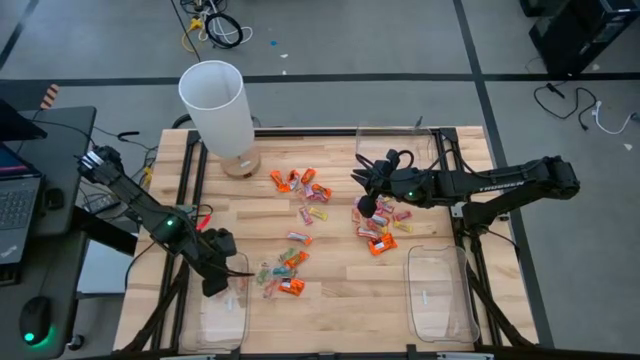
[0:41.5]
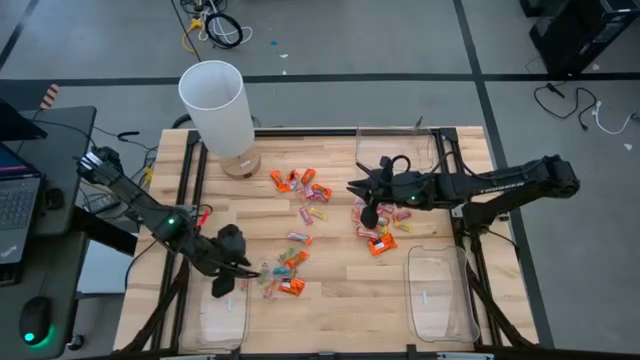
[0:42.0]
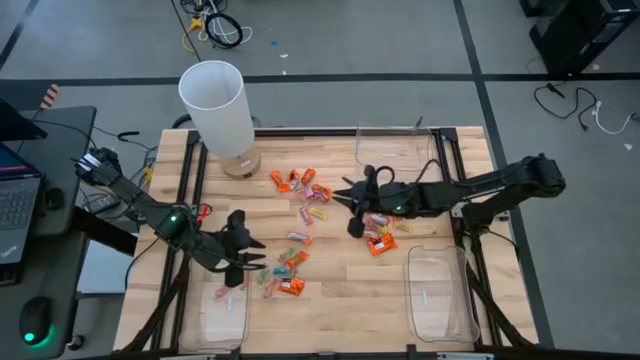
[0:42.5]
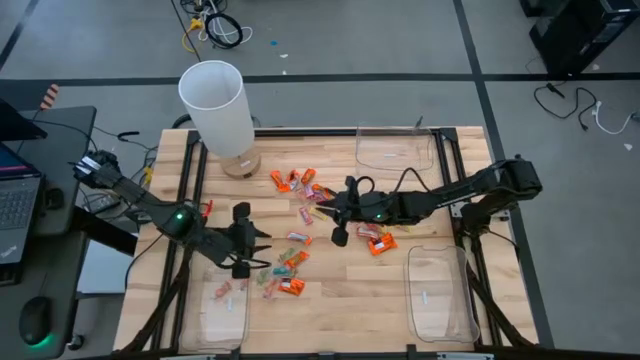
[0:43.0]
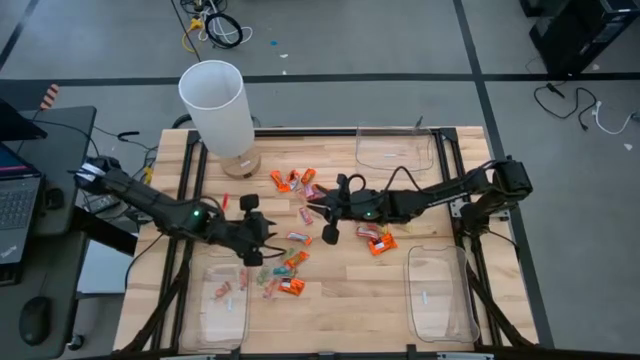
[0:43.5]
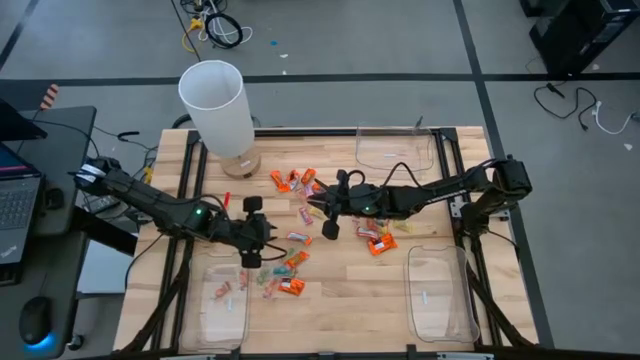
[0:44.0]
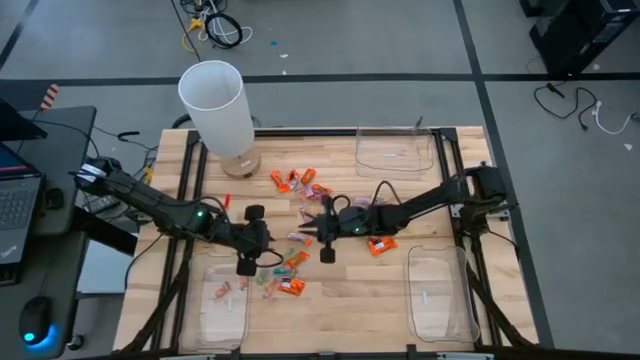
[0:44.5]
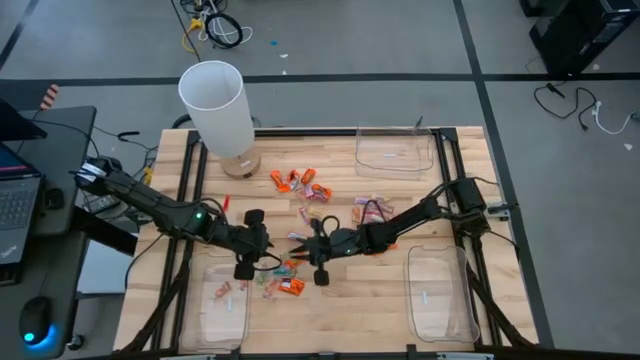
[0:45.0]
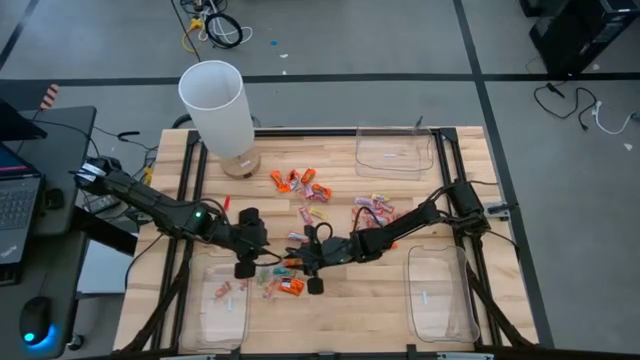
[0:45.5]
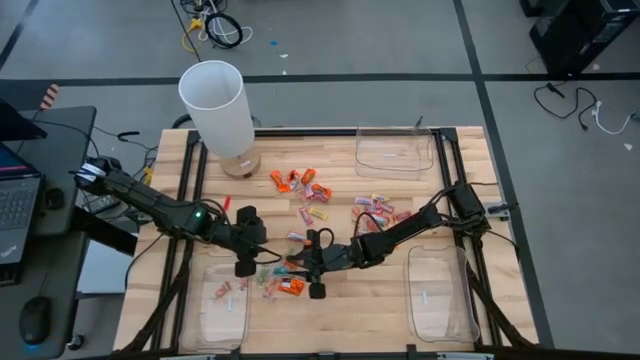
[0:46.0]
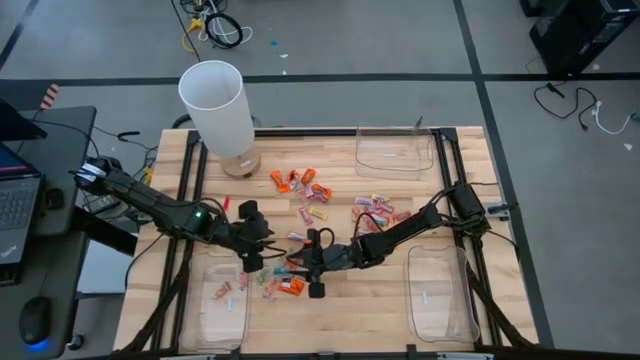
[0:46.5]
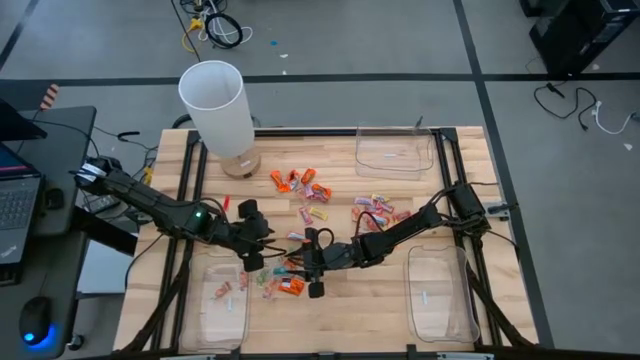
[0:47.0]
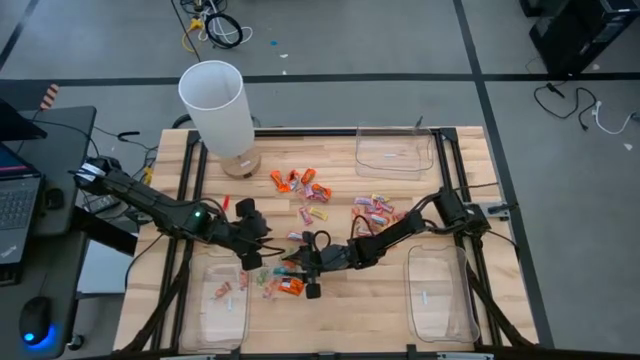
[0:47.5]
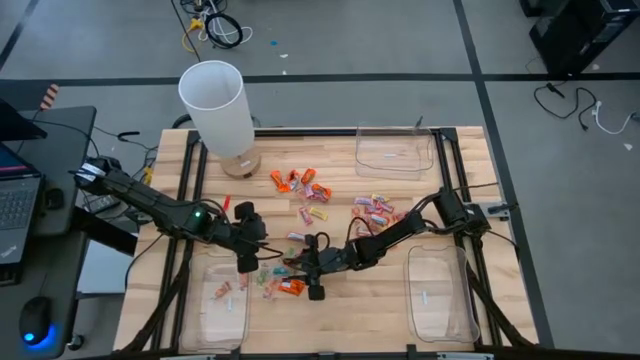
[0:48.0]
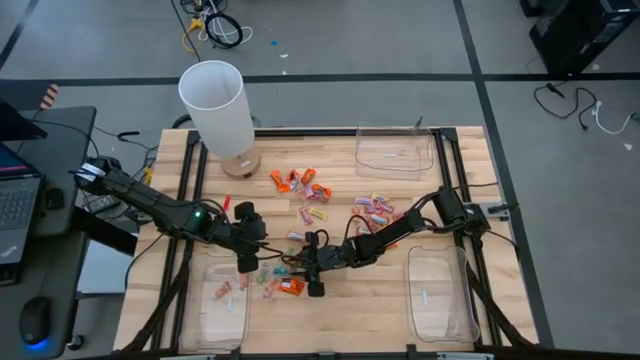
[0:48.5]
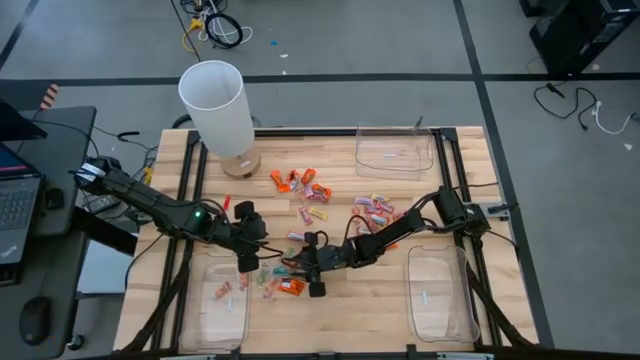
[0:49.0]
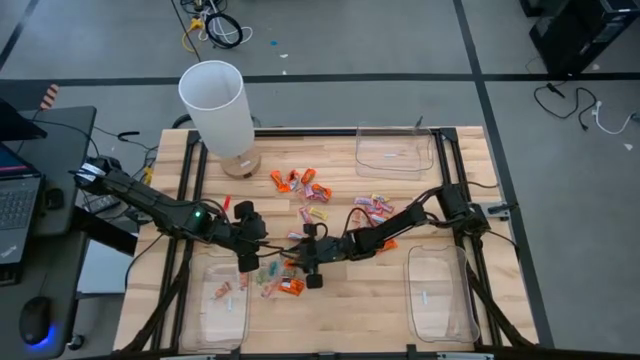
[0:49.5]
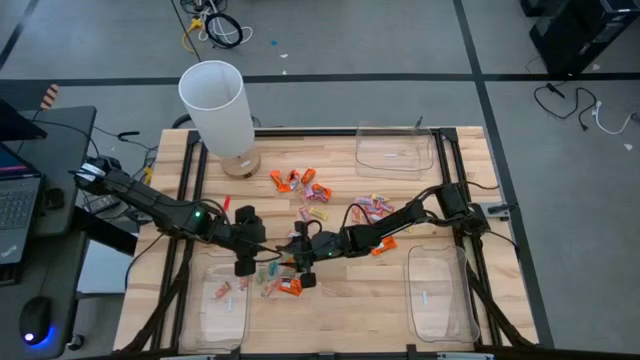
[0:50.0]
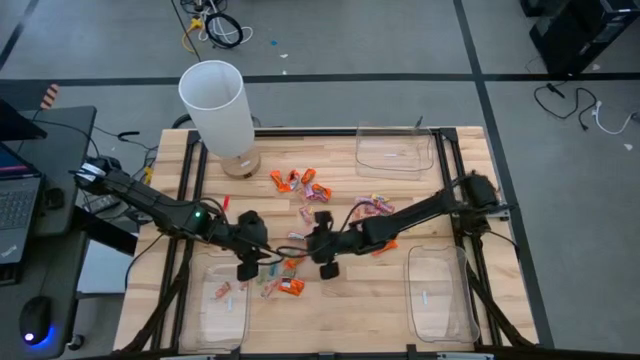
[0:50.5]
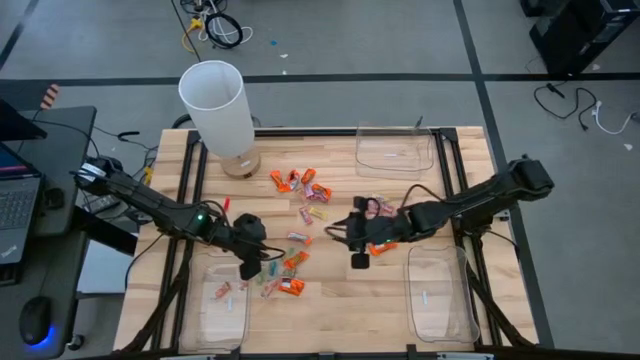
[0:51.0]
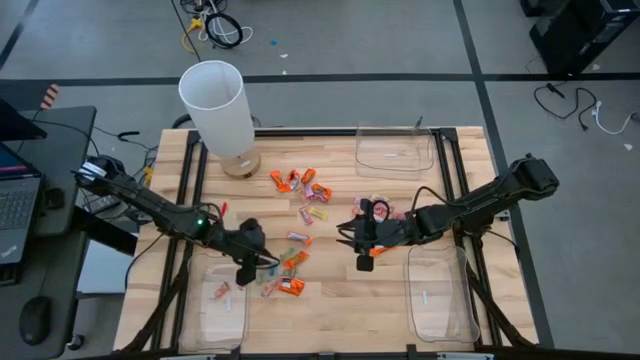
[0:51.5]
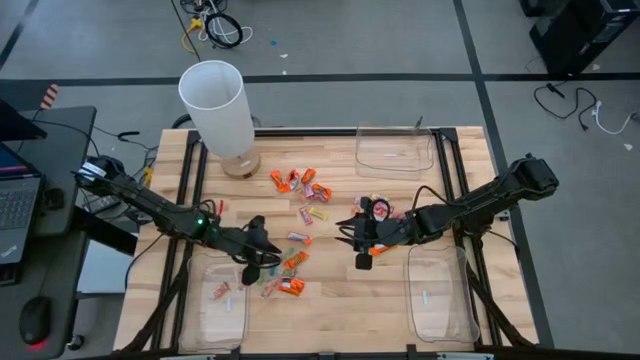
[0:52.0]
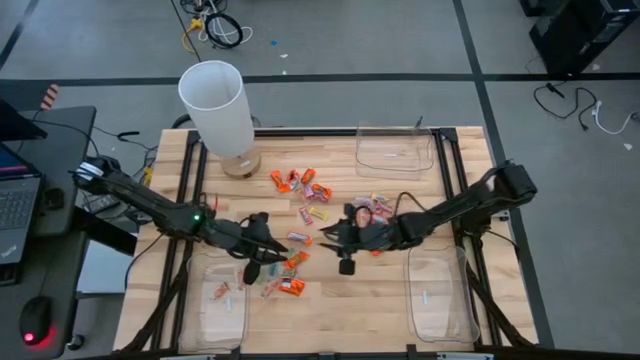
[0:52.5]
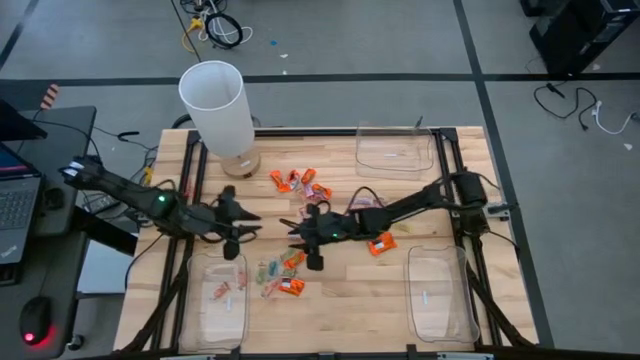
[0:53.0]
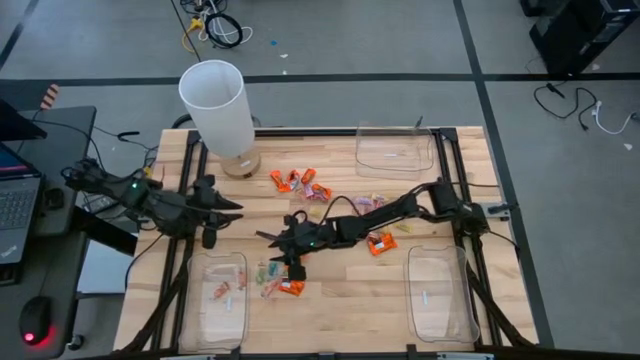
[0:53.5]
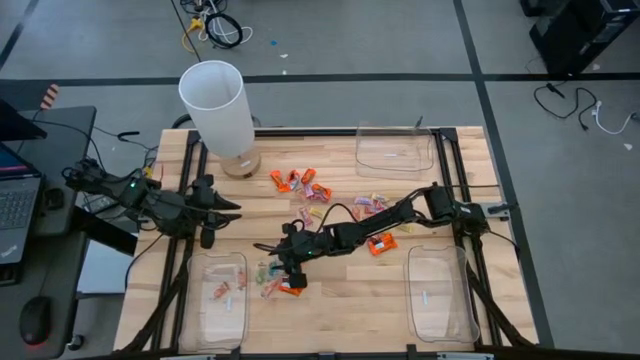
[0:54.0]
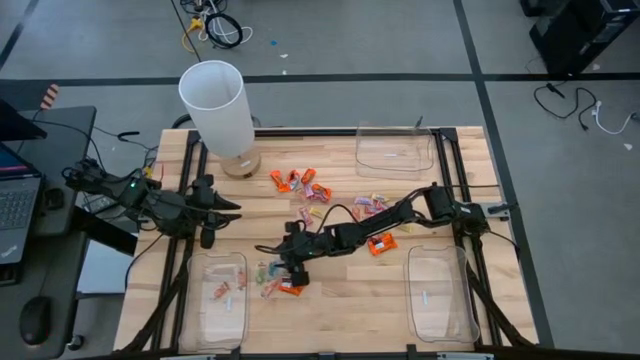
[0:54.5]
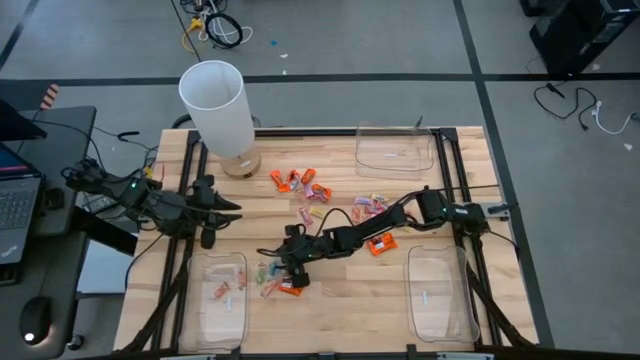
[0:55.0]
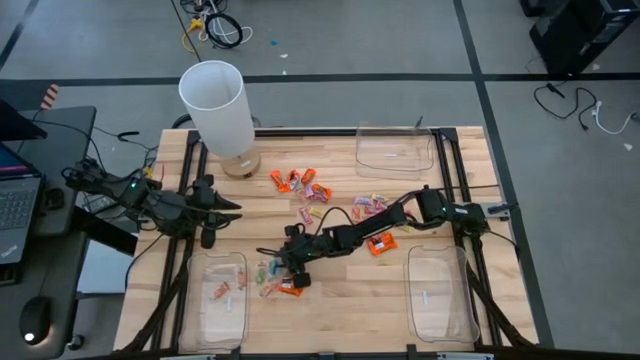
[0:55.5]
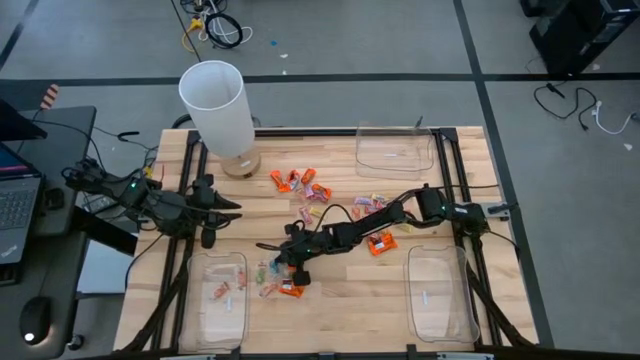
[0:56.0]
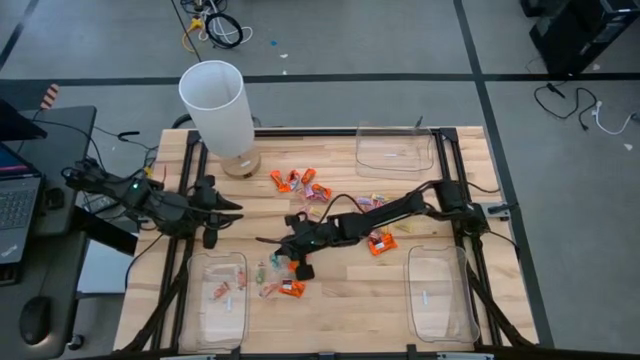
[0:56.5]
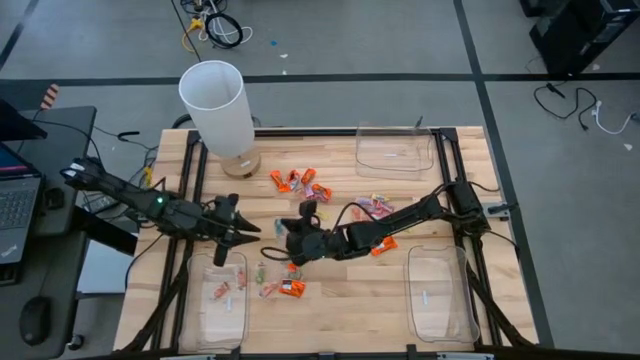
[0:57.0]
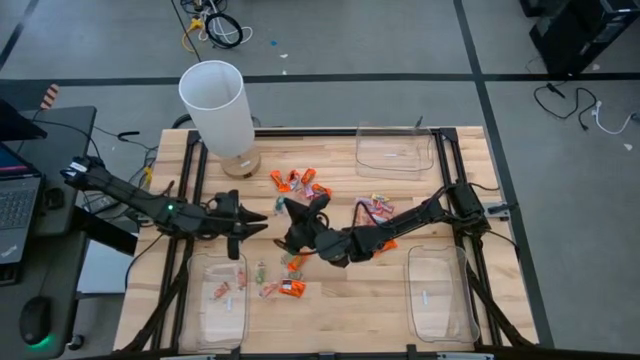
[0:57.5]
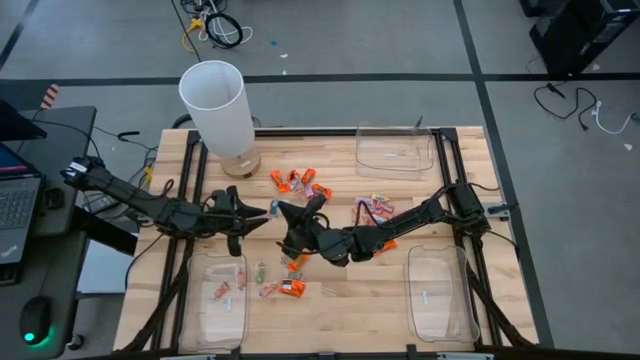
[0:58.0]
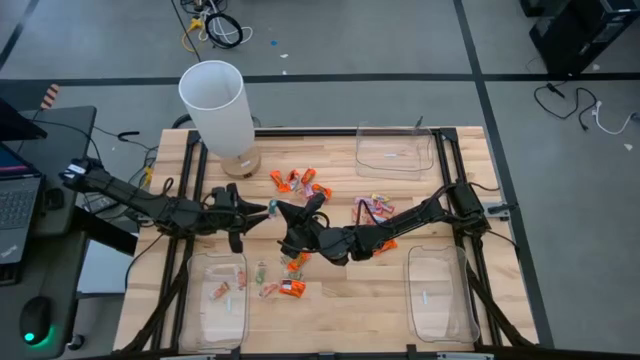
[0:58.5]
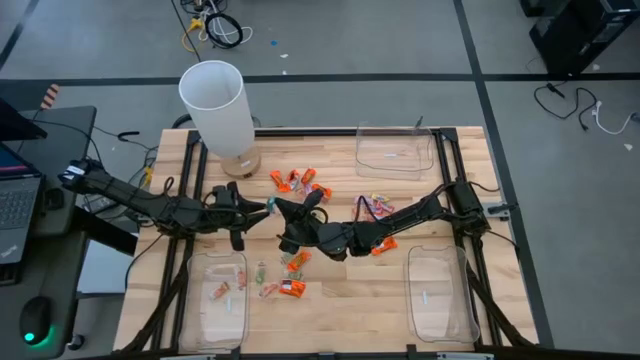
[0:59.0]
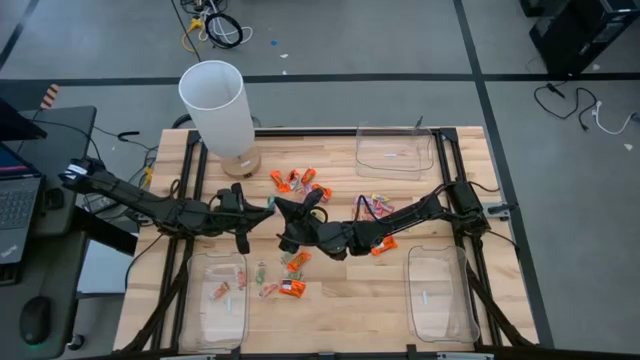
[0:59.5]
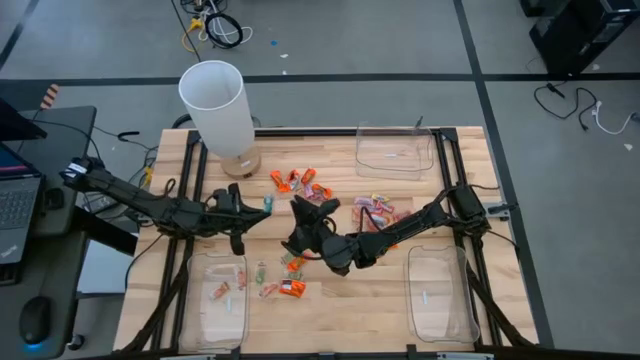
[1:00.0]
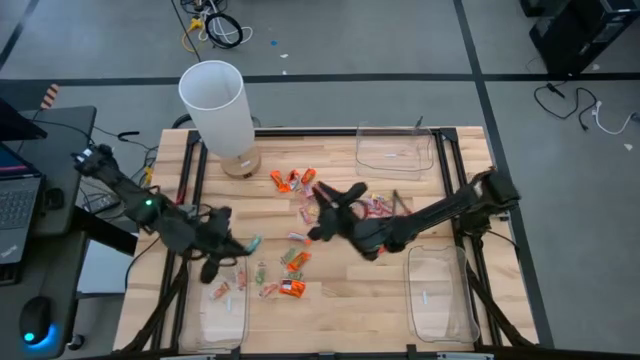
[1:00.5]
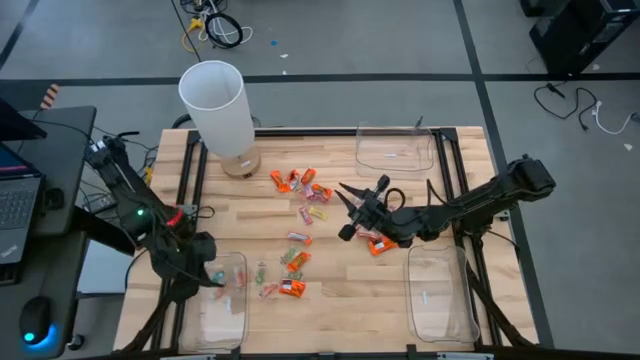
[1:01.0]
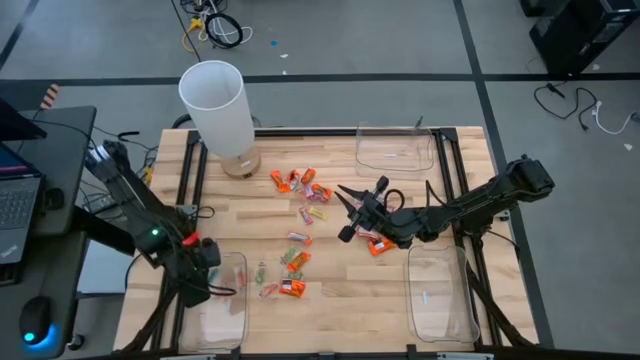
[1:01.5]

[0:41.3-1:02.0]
Task: Sort candy
Put the blue gummy into the bottom left transparent bin
